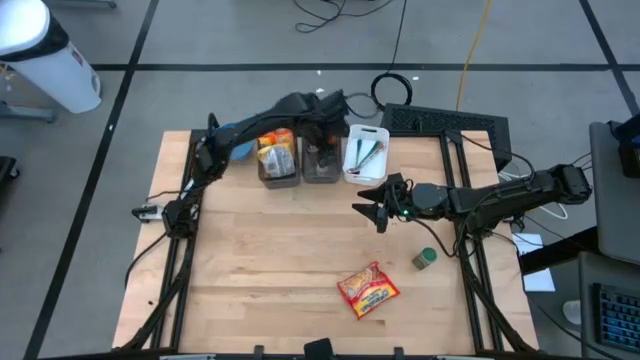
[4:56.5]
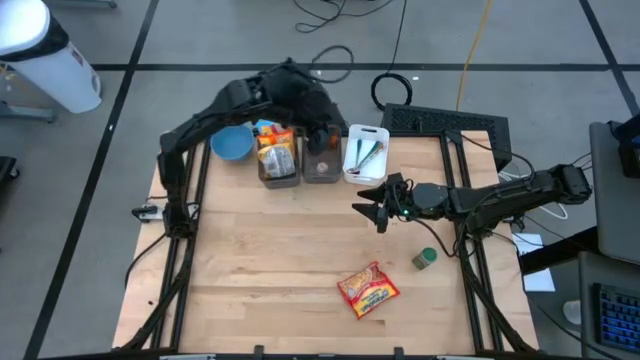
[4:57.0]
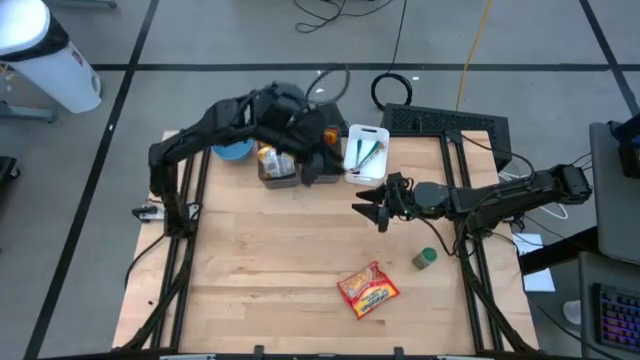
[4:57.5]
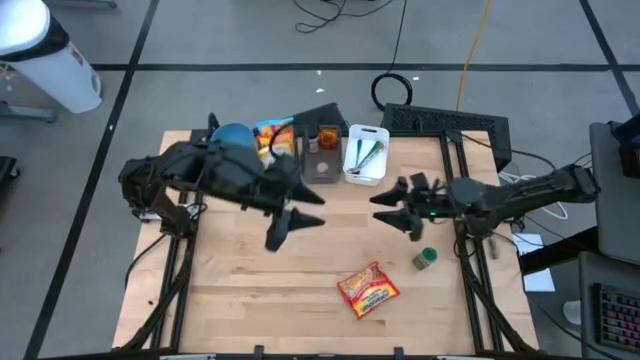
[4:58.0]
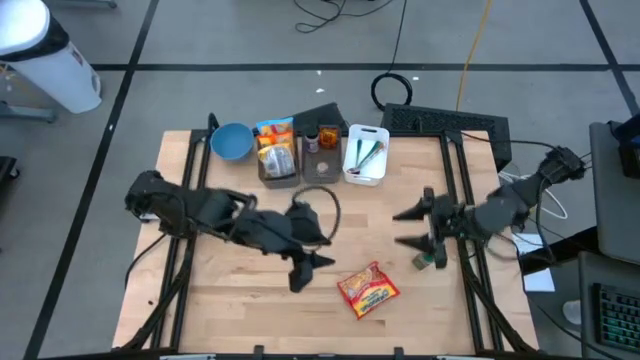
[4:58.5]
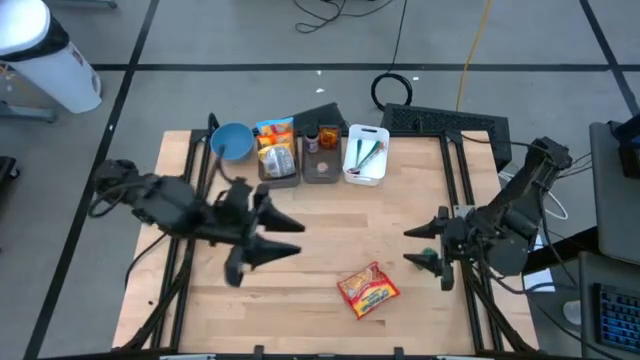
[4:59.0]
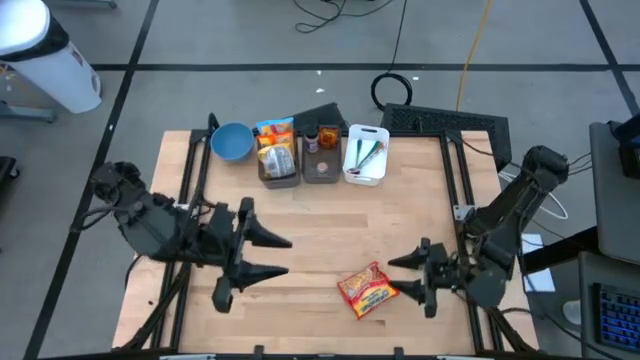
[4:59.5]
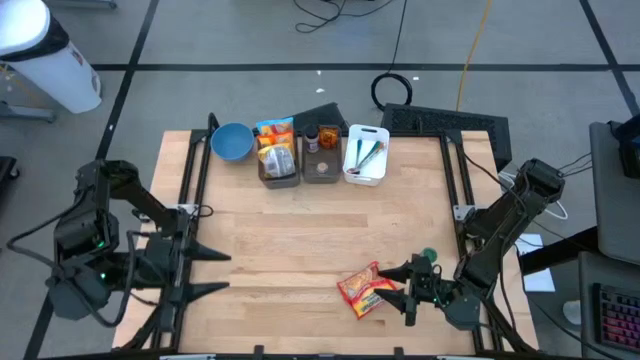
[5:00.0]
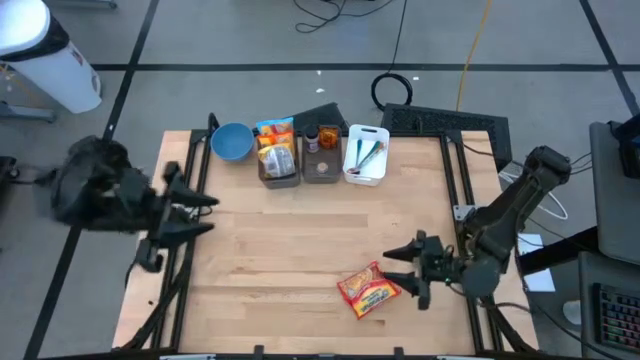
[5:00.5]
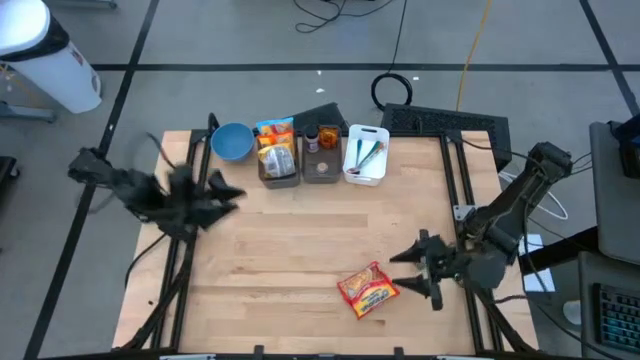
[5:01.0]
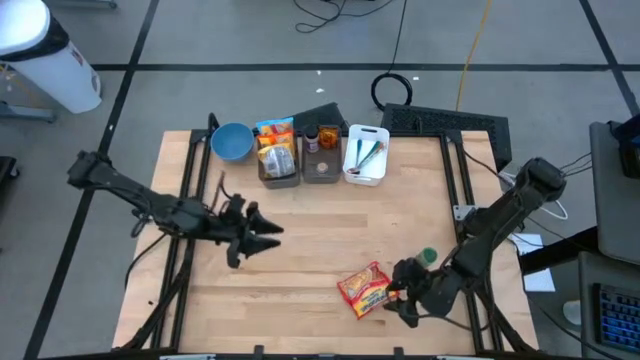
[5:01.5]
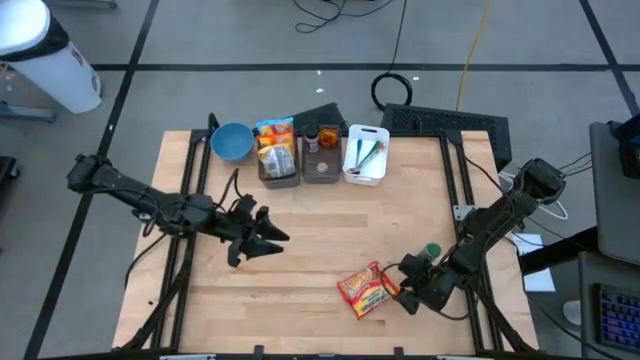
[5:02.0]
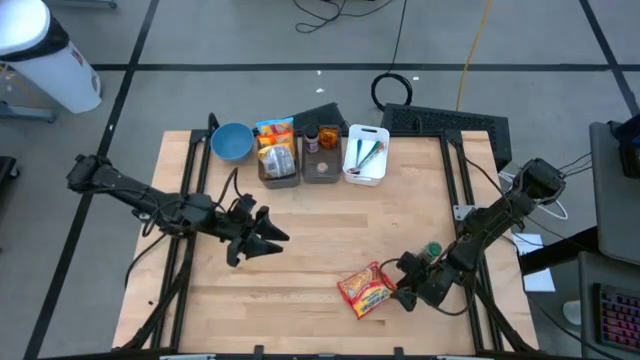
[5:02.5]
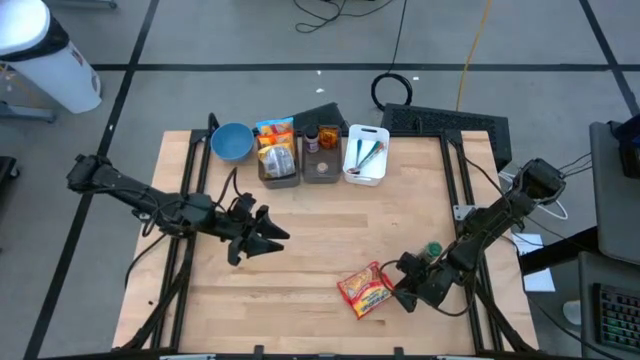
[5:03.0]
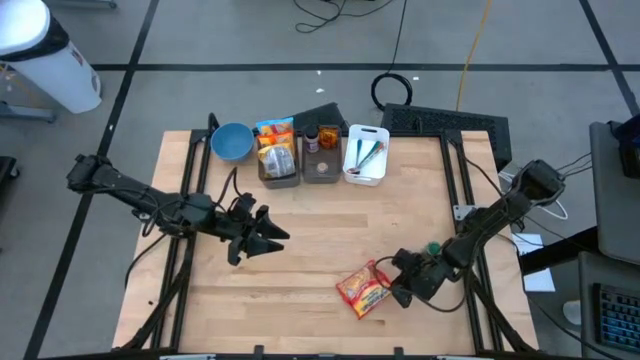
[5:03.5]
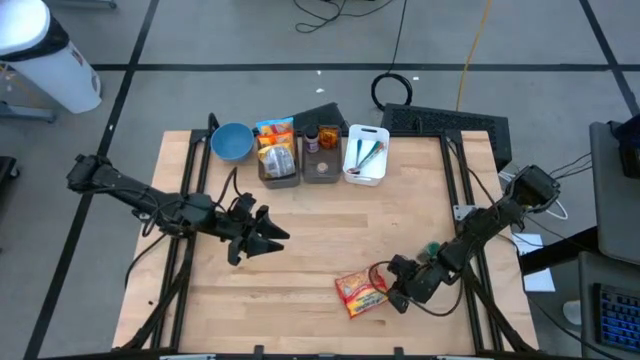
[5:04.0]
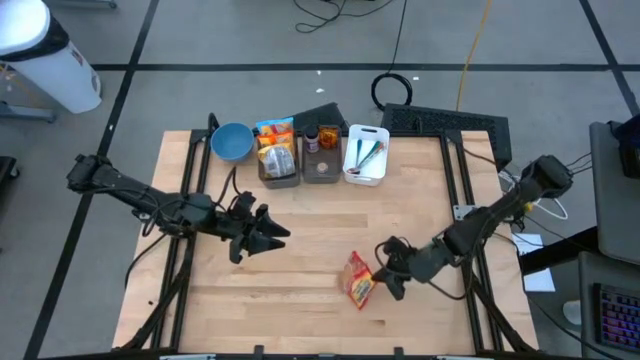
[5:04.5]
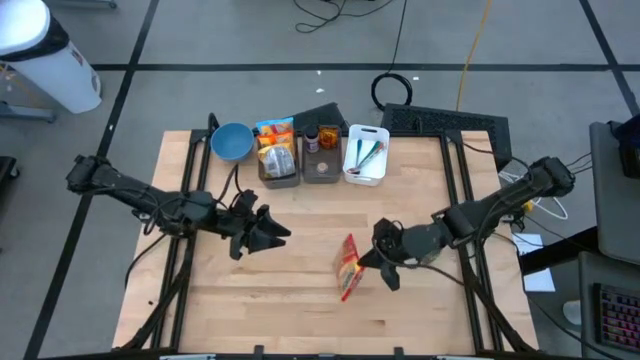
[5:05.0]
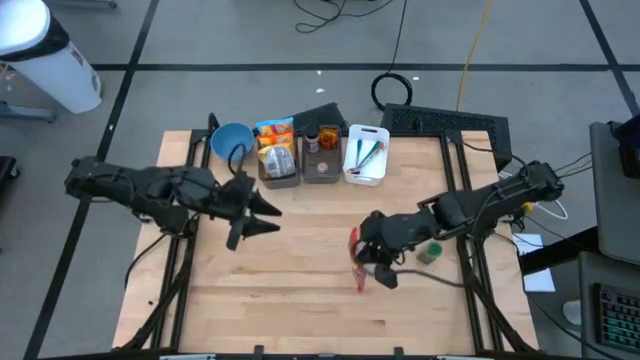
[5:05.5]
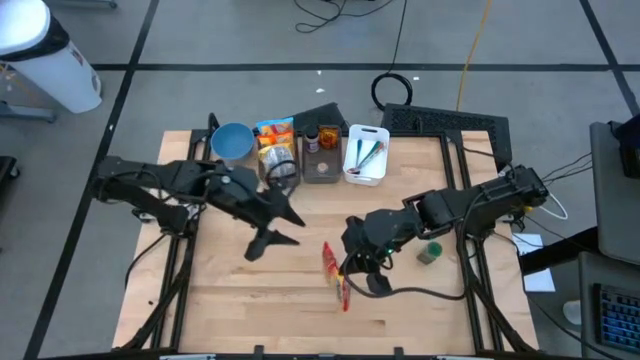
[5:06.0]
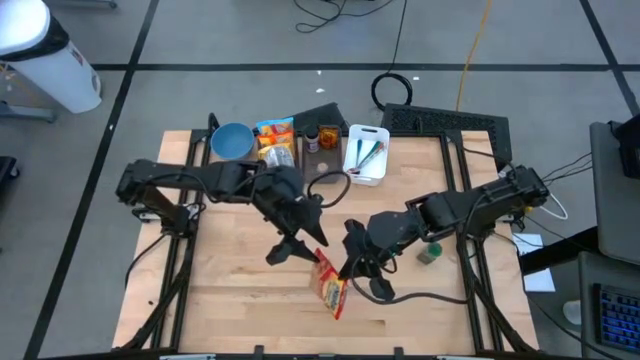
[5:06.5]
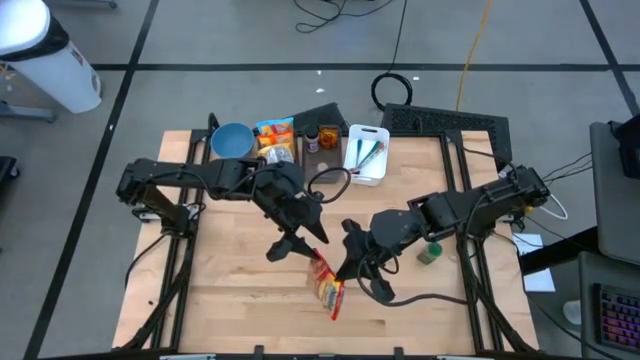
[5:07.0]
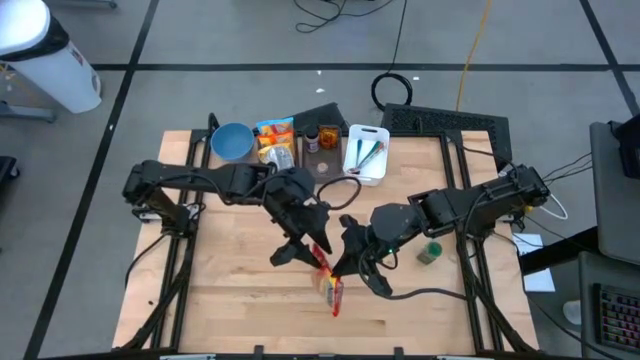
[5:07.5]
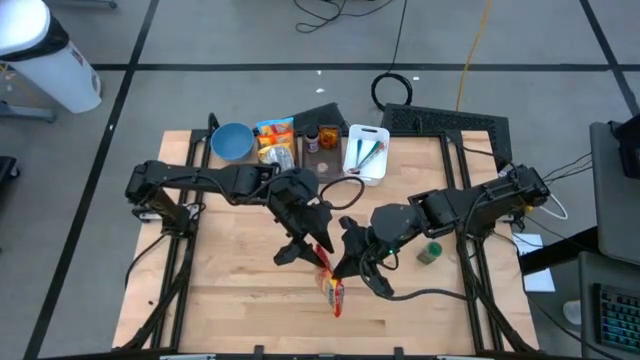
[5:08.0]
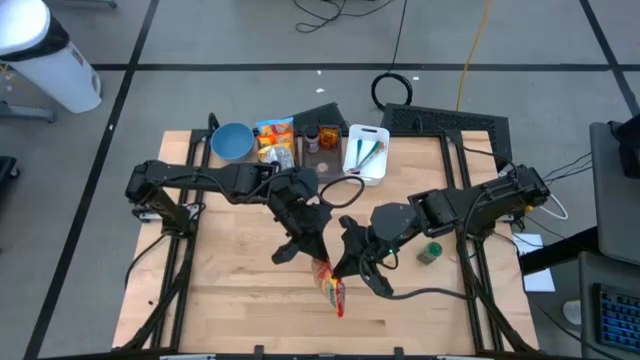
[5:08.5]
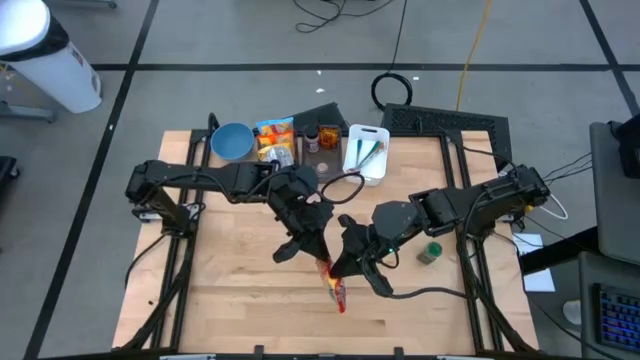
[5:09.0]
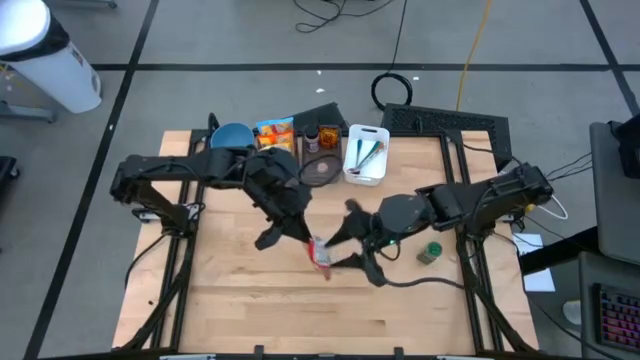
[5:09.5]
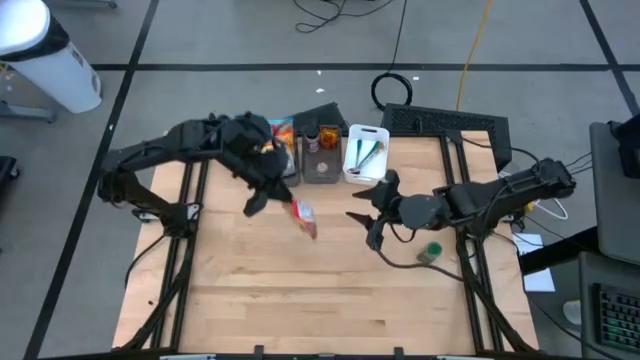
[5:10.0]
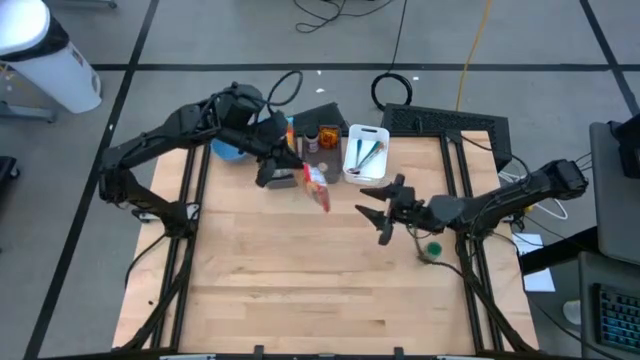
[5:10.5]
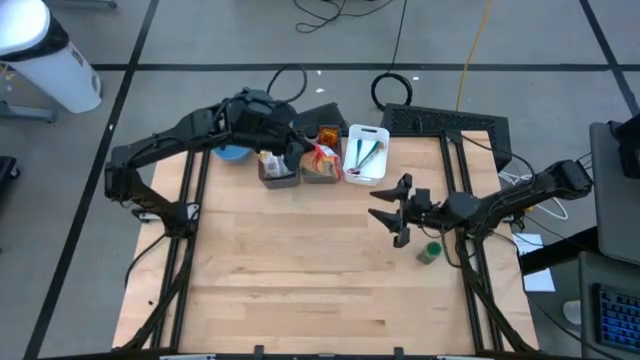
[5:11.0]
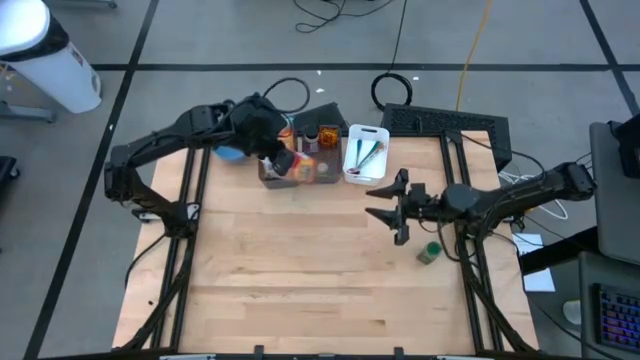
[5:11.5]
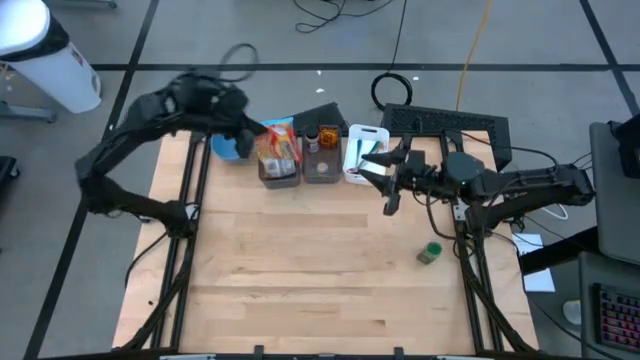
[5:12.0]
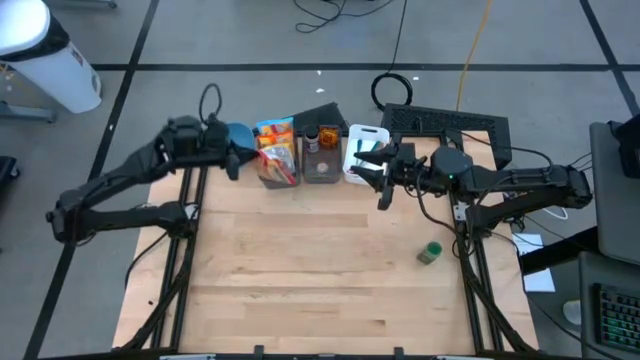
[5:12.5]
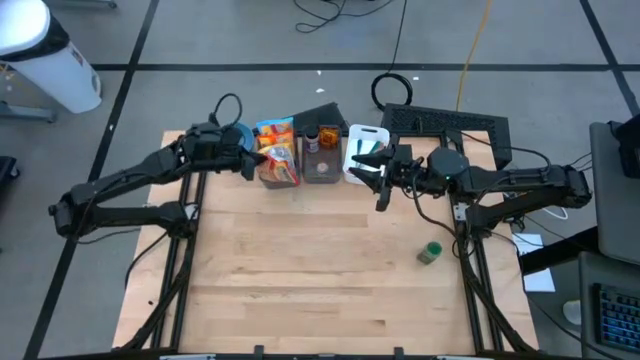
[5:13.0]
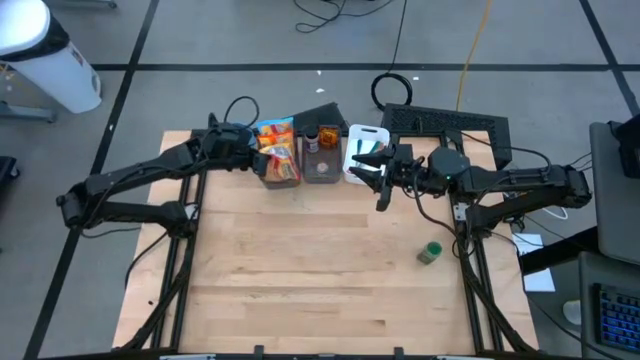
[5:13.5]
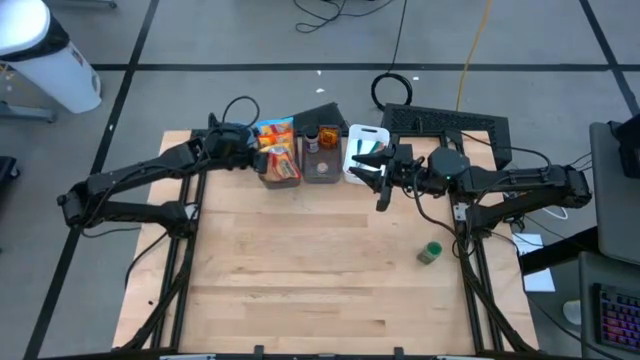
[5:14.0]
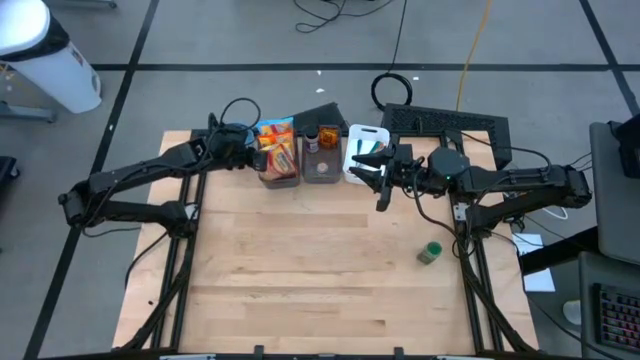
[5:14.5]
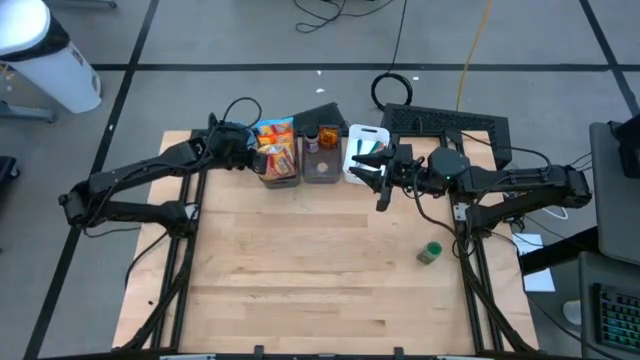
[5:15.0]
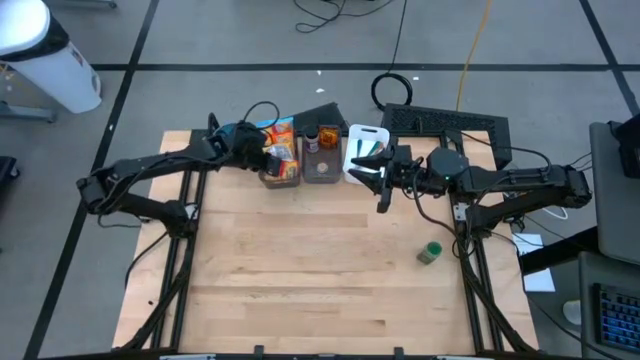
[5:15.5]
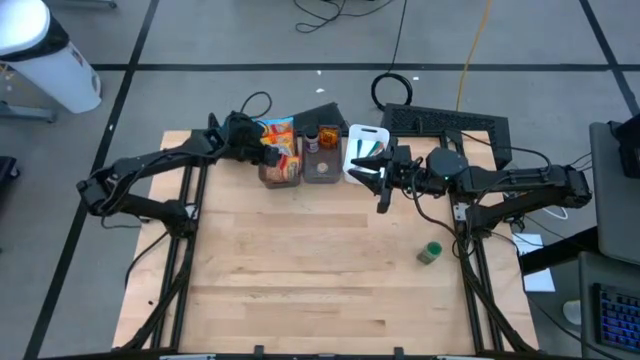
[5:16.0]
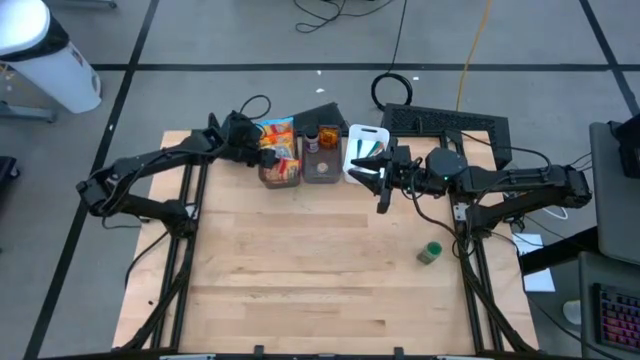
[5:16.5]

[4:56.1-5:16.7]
Task: Pick & Place Food Item
Put the red noodle pack into the left black bin

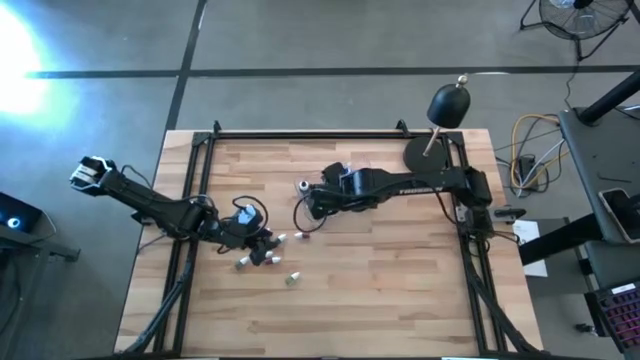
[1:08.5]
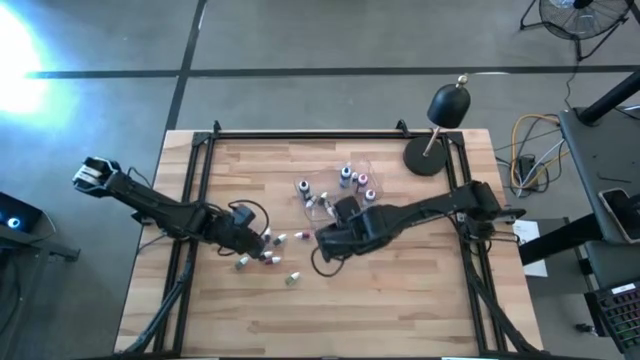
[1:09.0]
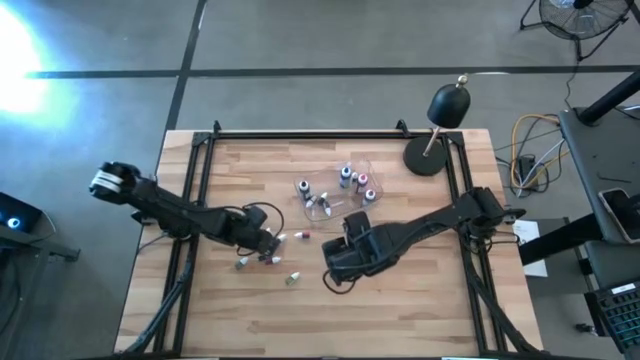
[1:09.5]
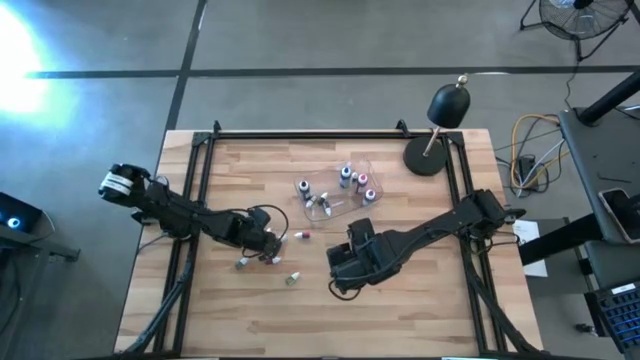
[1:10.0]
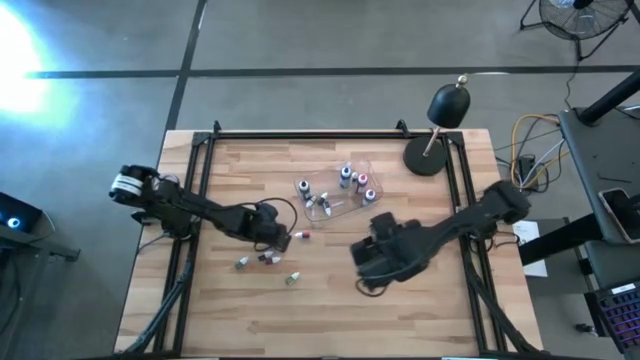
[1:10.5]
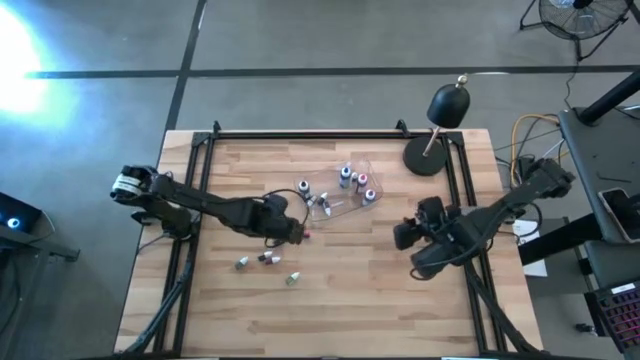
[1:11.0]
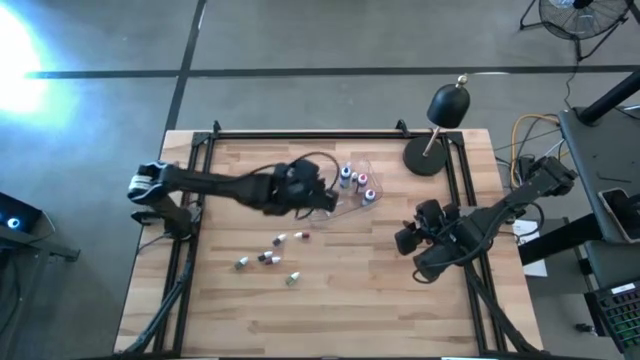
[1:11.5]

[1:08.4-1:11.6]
Task: Pick & Place food coloring
Put the small black food coloring bottle into the transparent bin
